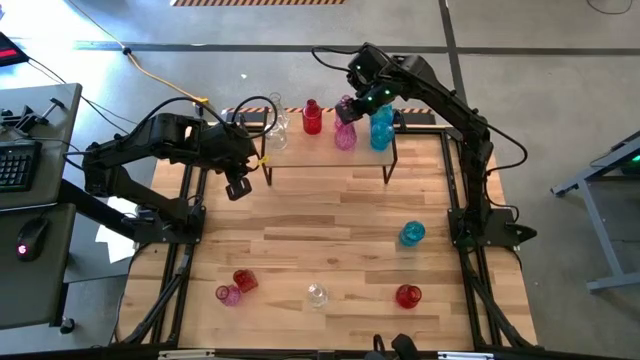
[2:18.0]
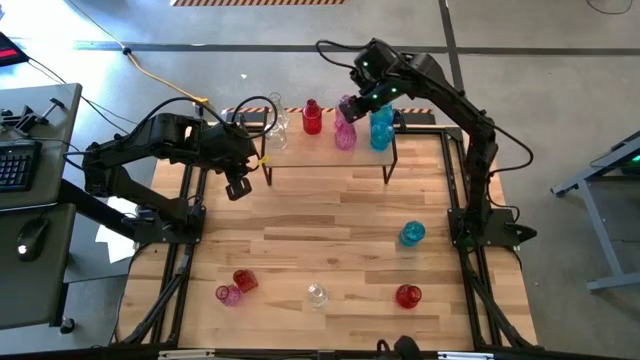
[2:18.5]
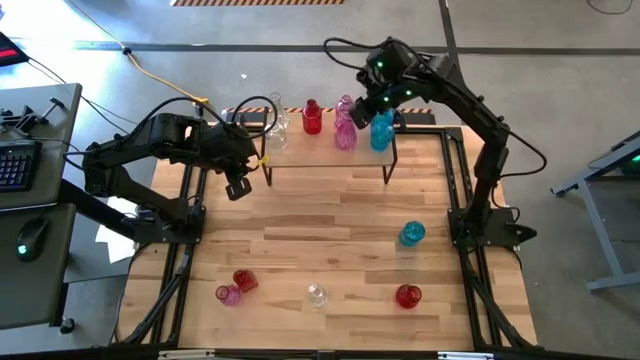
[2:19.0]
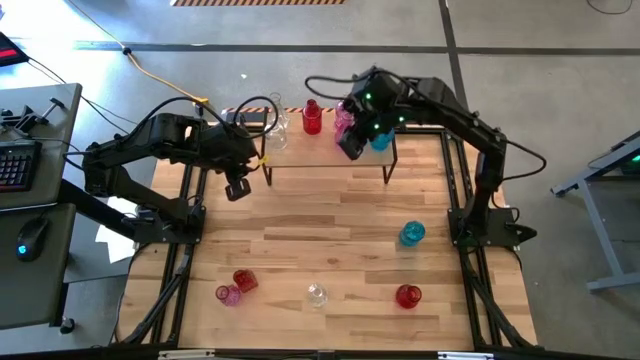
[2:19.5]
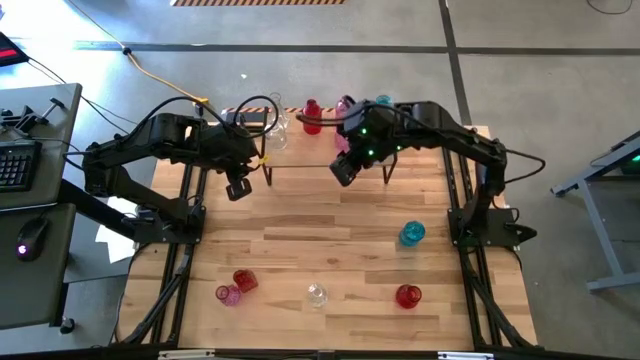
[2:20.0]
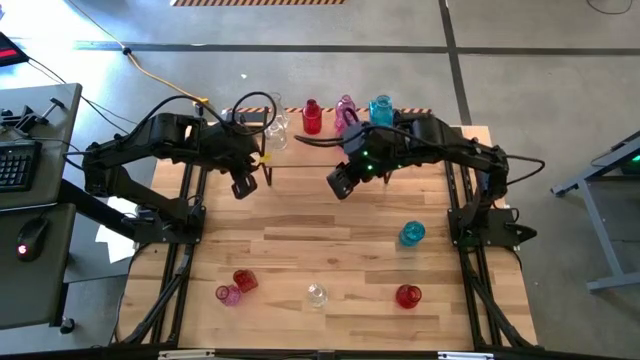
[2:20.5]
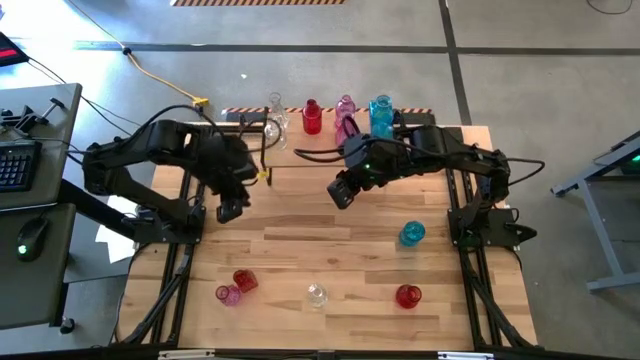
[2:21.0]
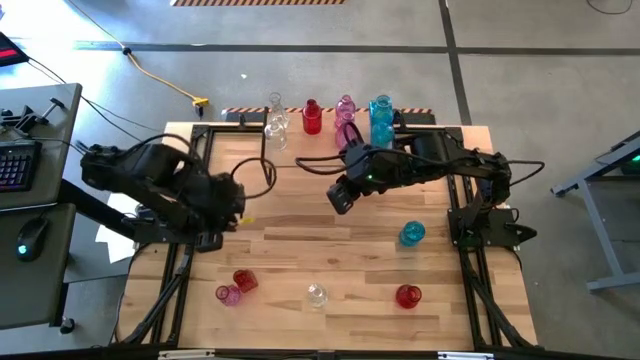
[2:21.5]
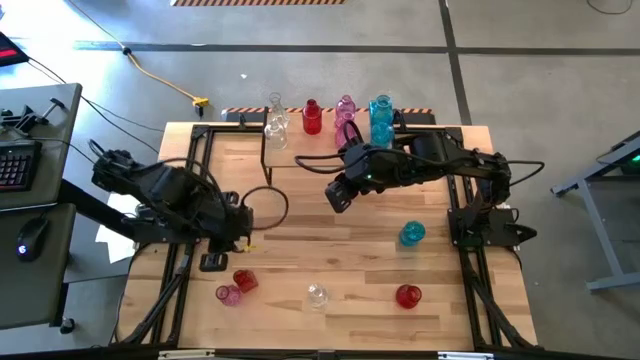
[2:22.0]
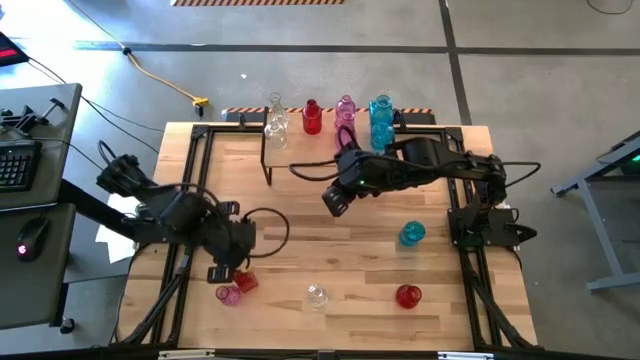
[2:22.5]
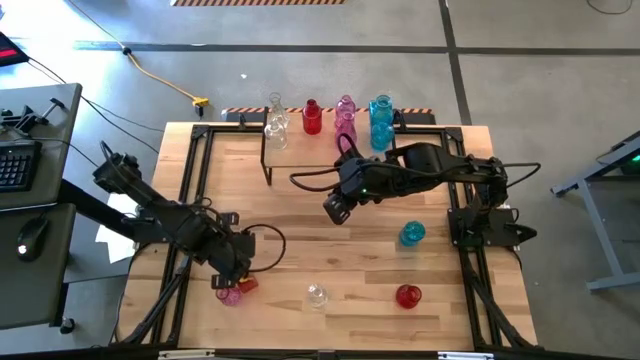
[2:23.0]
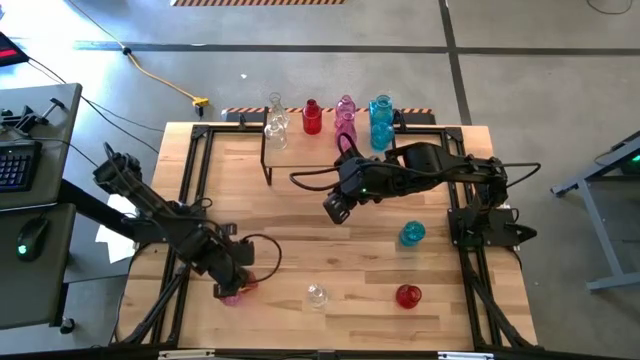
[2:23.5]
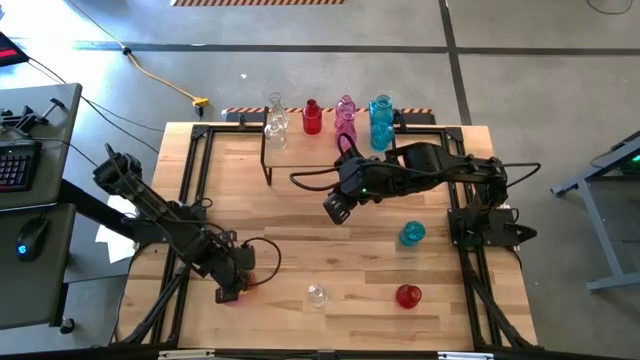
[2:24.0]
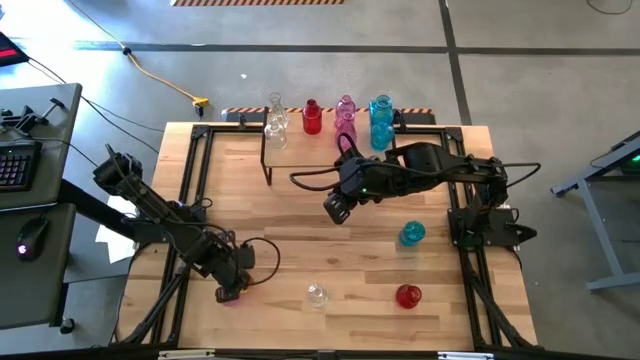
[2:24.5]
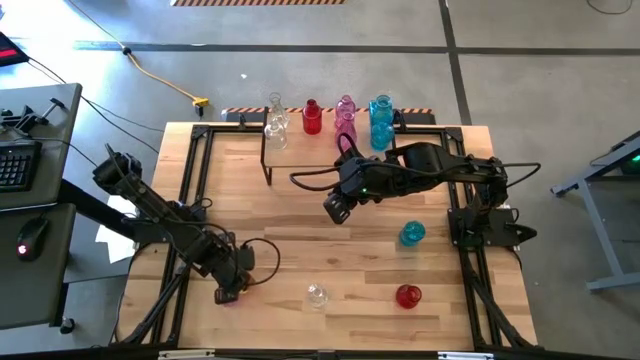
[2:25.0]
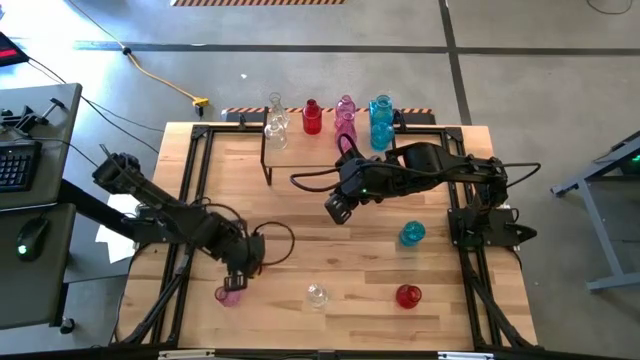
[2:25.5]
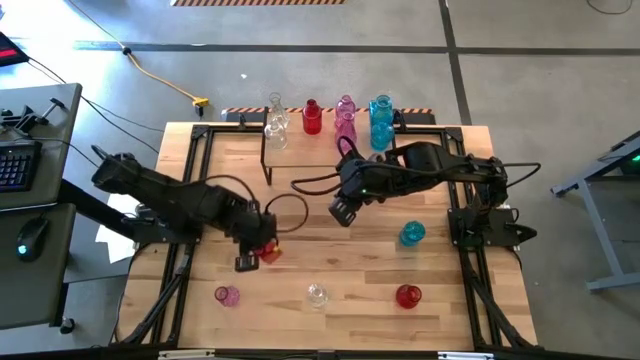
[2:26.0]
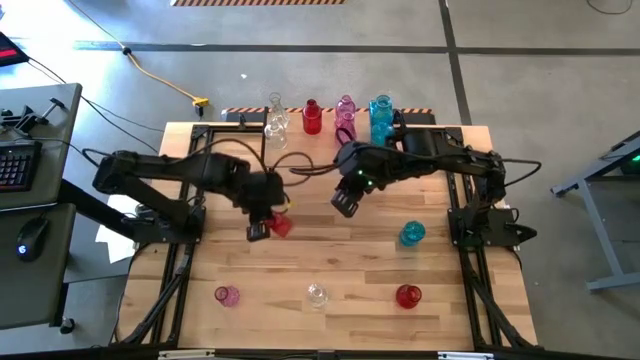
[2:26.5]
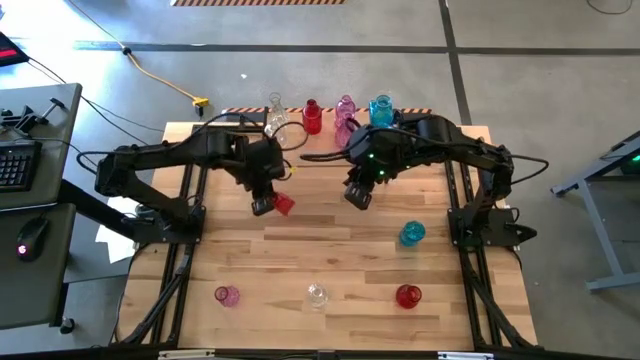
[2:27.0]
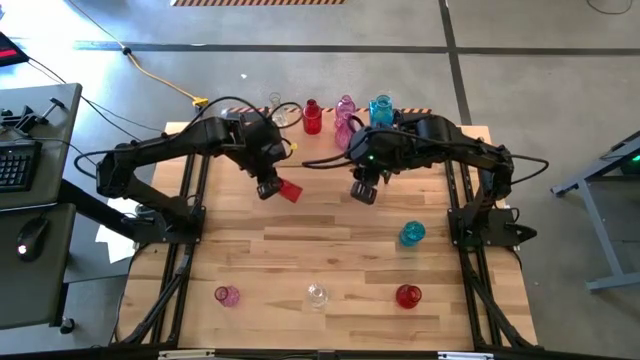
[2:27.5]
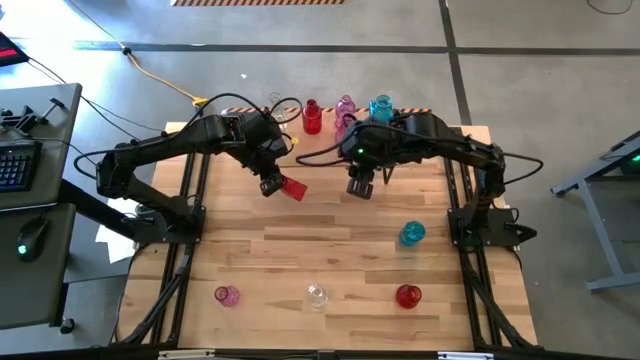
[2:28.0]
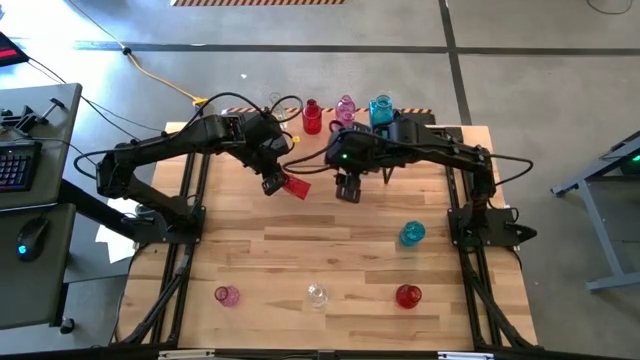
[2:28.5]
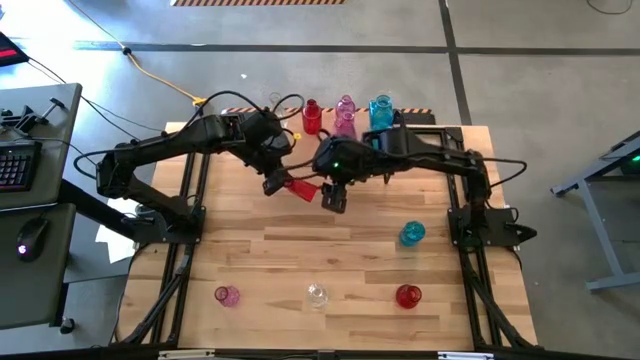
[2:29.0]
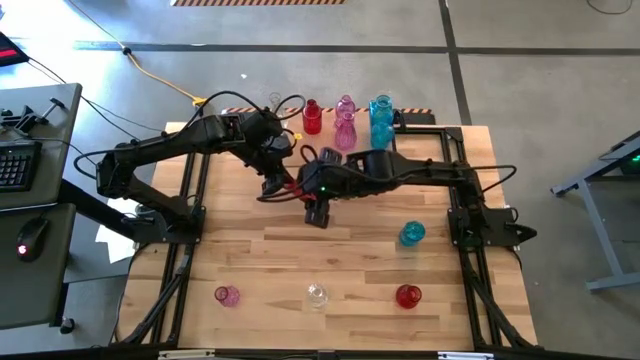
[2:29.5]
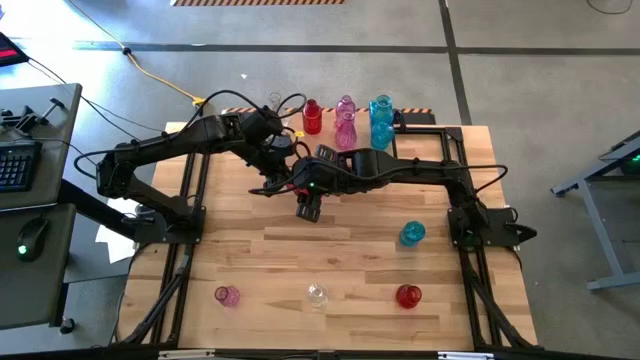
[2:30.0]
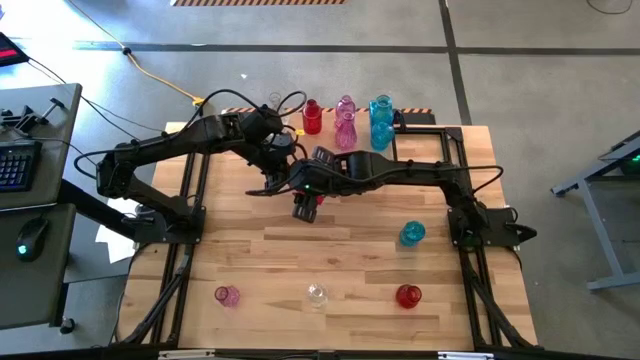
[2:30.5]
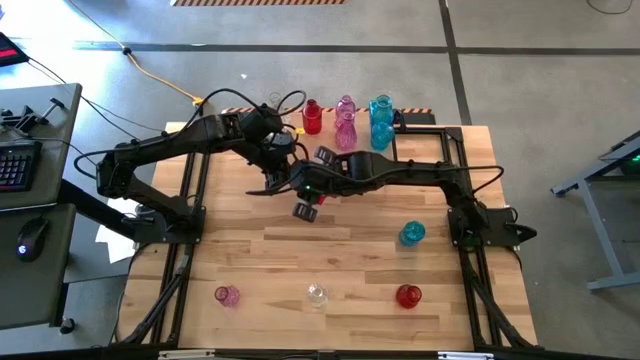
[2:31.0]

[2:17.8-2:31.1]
Task: sort vases onto shelf
Put the left red vase on the shelf aligned with the other red vase
